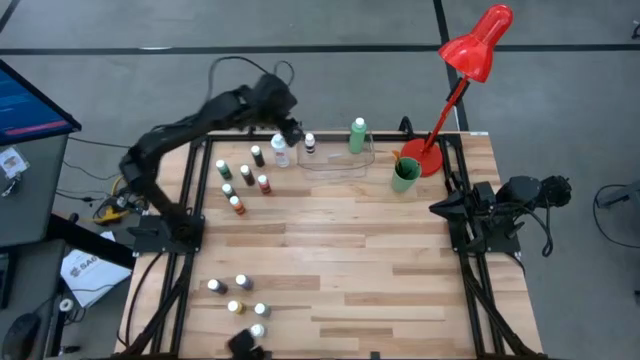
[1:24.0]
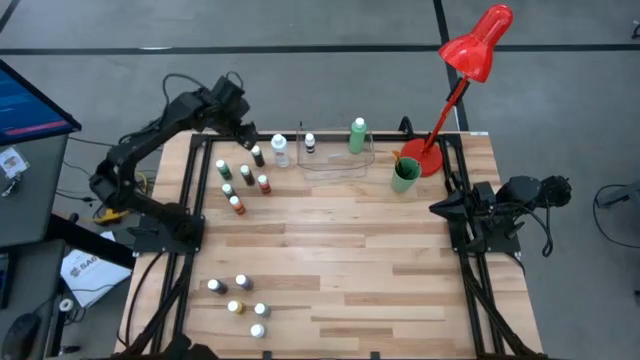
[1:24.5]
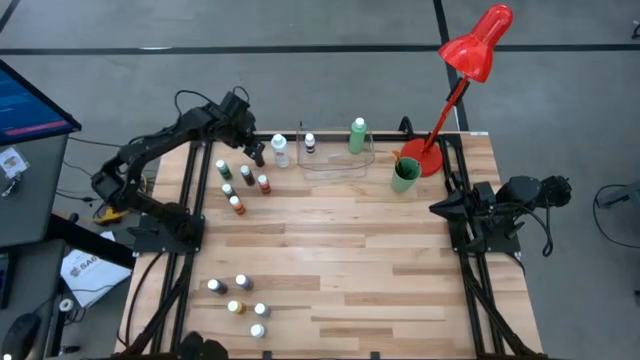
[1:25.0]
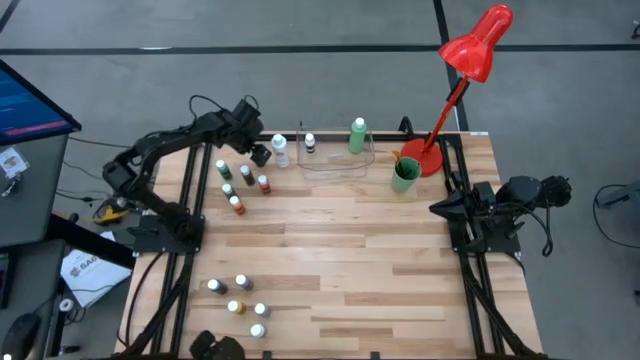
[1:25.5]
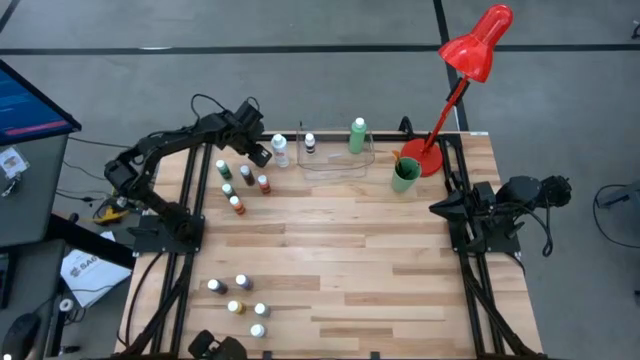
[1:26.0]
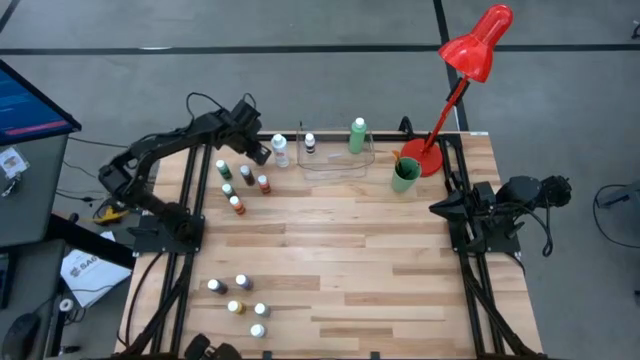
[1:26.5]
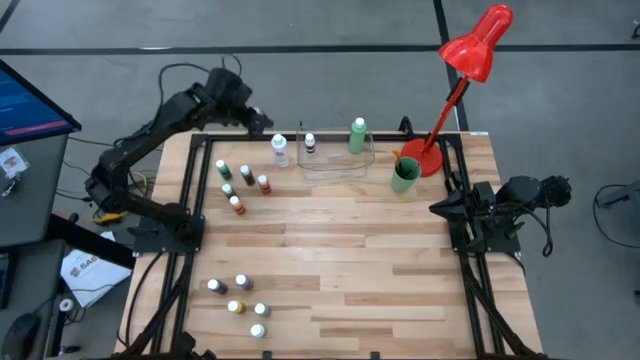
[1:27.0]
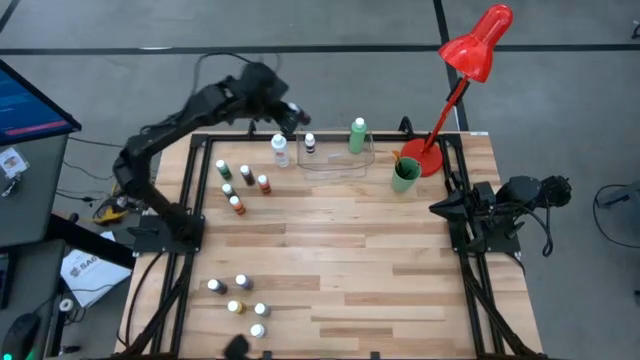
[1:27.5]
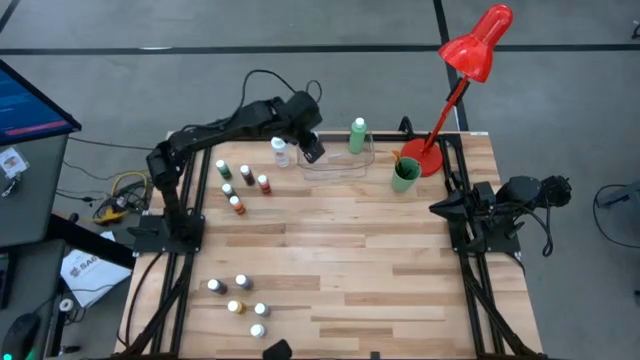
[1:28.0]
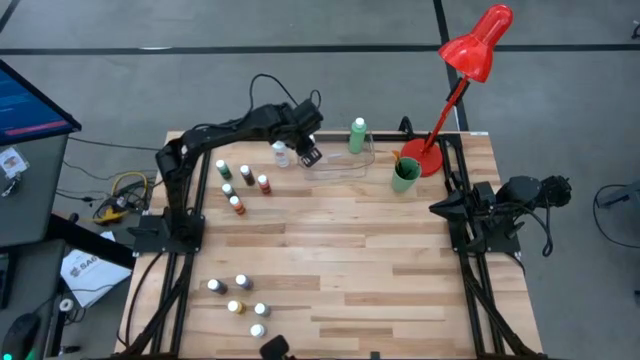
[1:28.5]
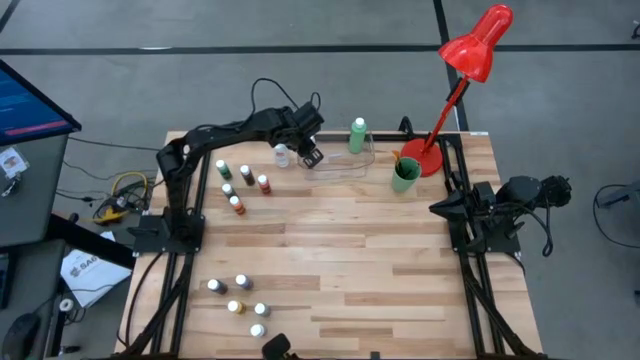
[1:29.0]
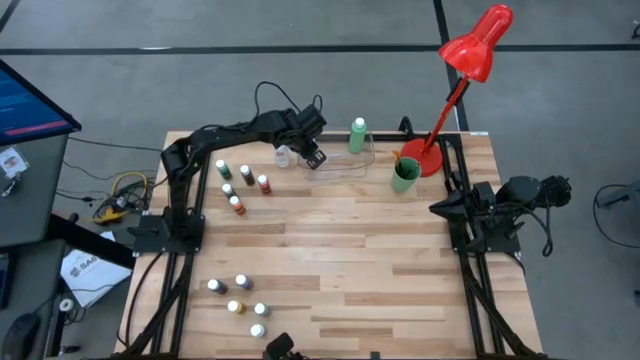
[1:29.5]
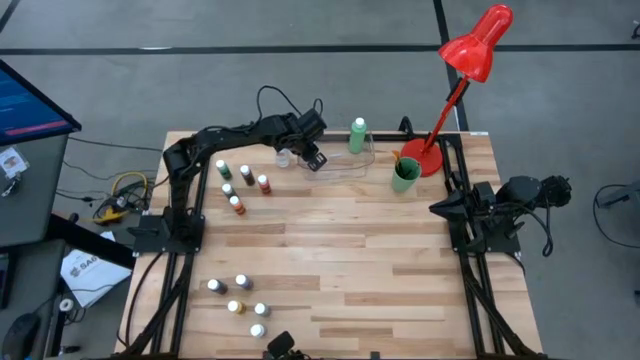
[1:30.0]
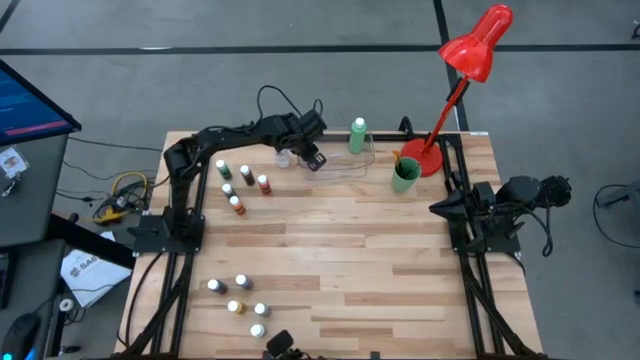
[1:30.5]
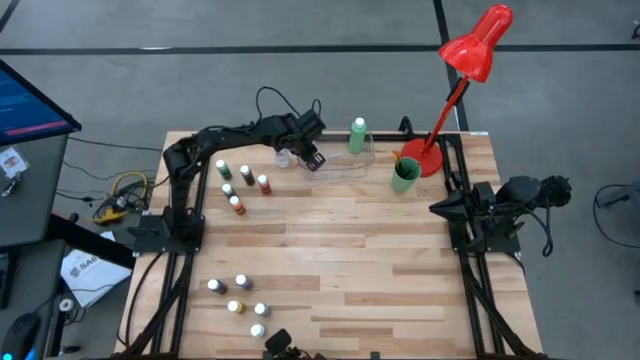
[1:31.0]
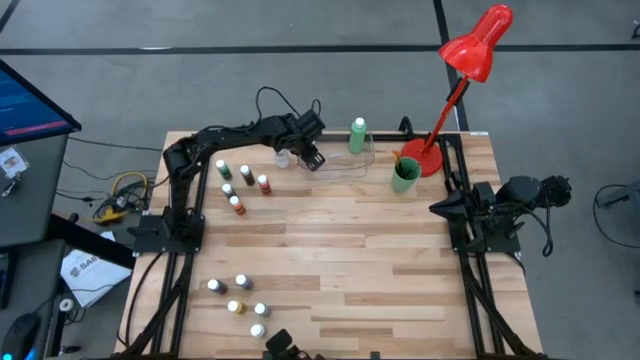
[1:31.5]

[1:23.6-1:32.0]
Task: Pick & Place Paint Supplies
Put the small black paint bottle into the transparent bin

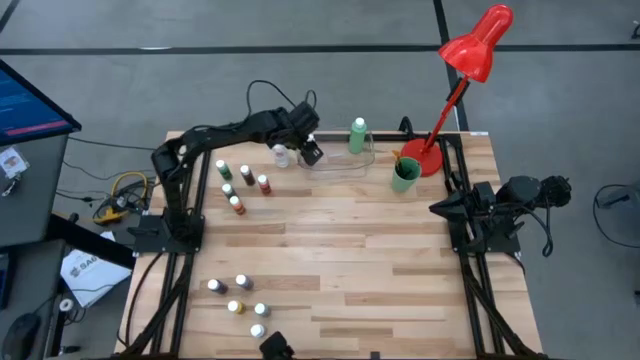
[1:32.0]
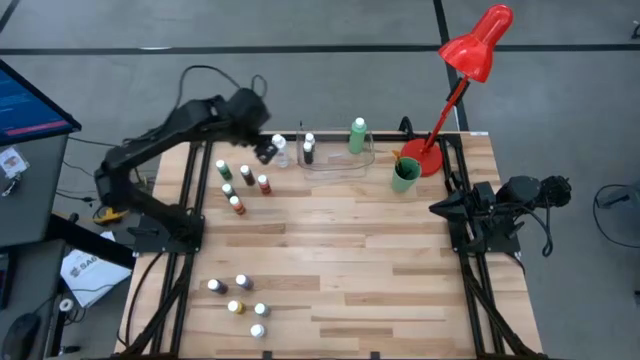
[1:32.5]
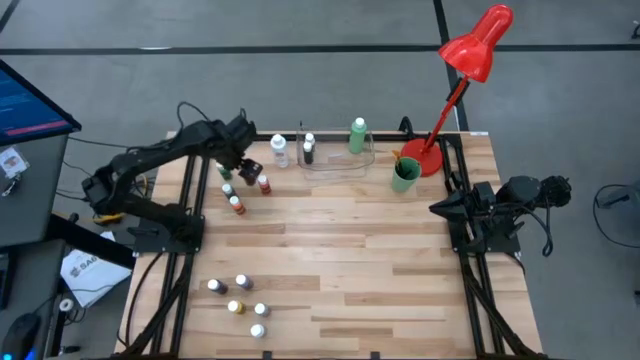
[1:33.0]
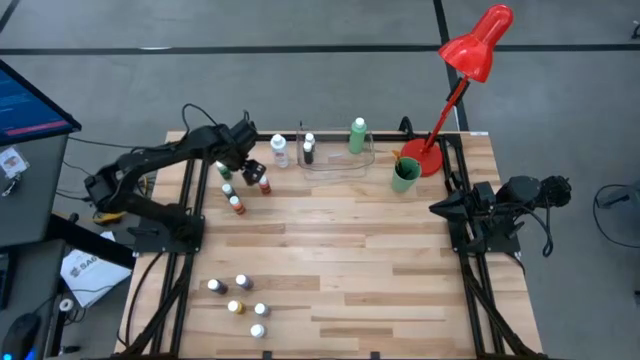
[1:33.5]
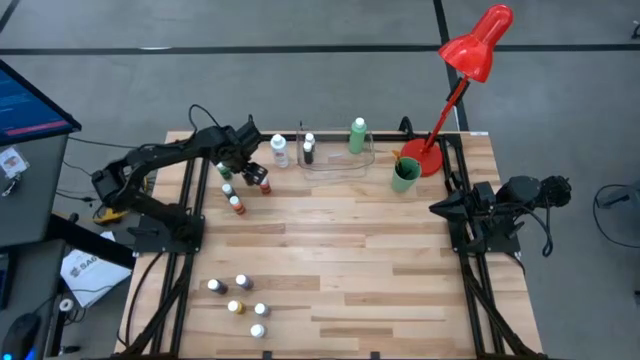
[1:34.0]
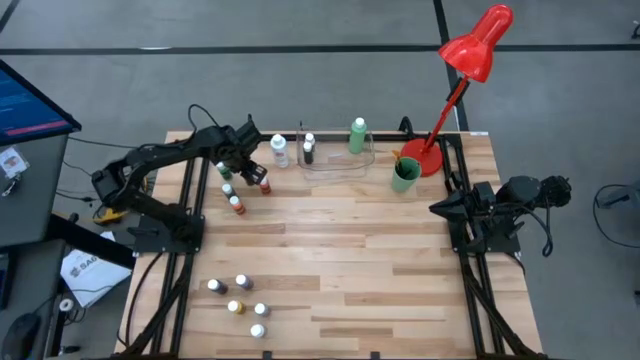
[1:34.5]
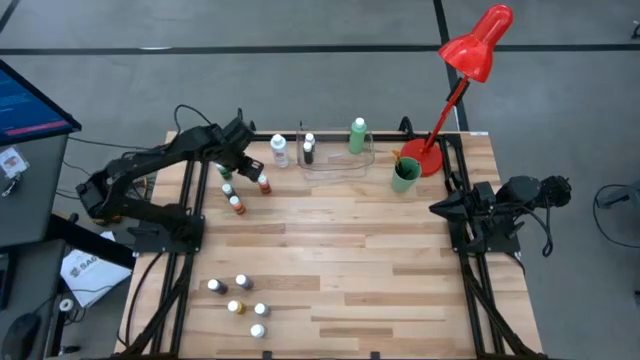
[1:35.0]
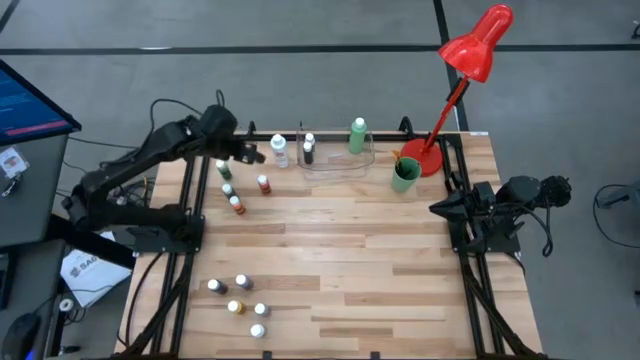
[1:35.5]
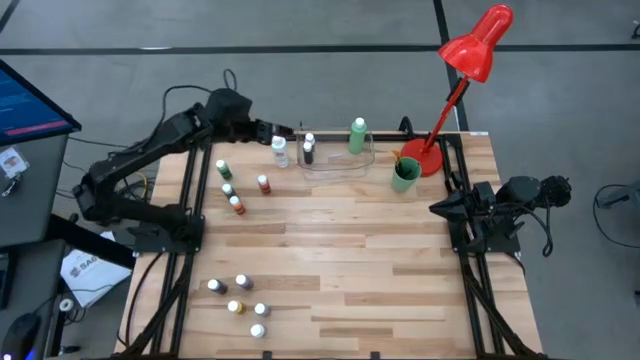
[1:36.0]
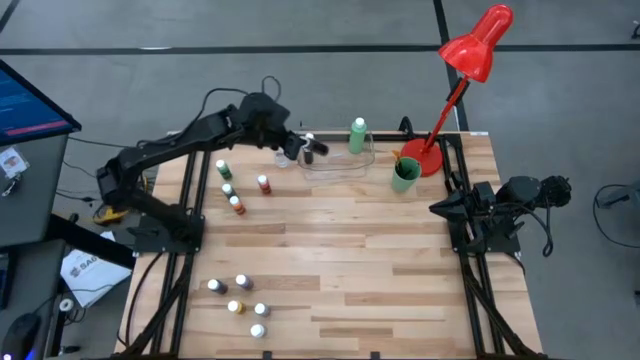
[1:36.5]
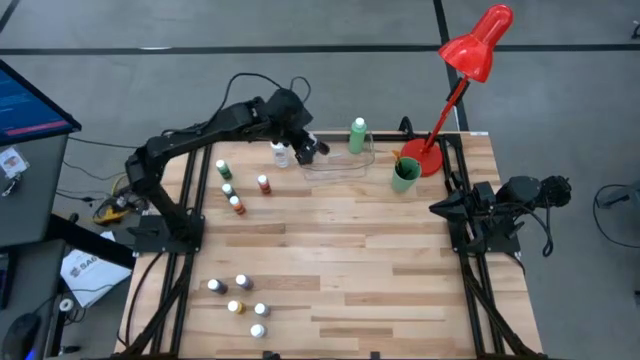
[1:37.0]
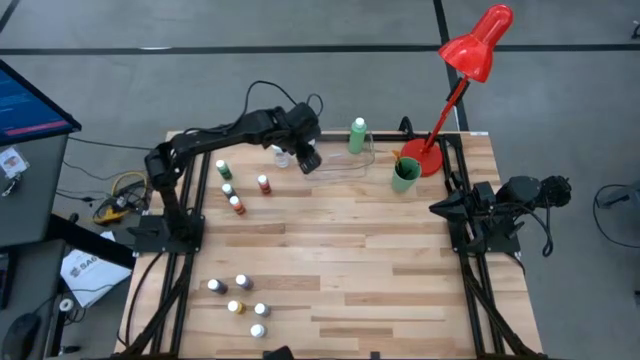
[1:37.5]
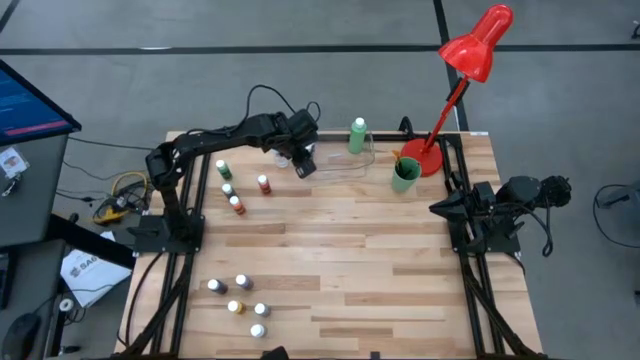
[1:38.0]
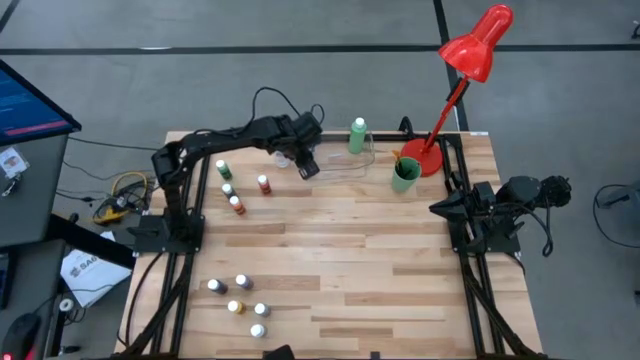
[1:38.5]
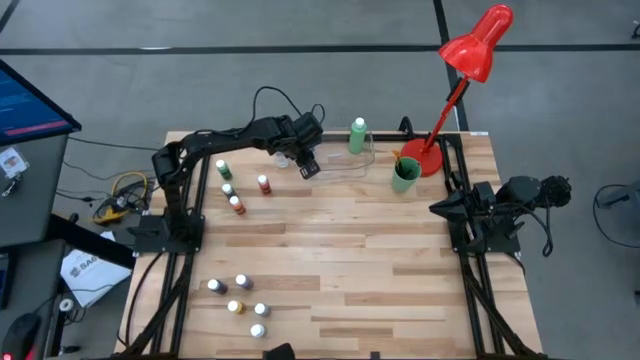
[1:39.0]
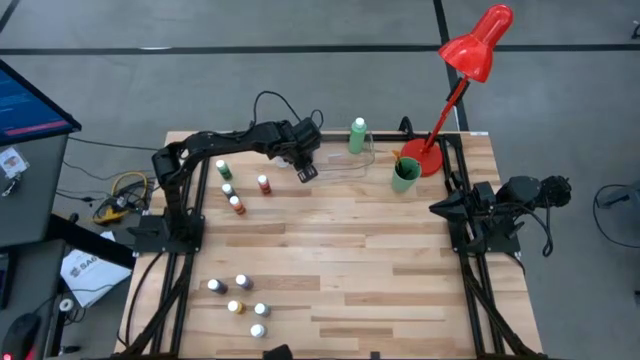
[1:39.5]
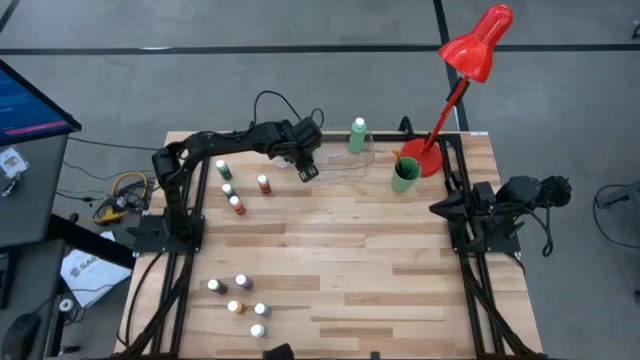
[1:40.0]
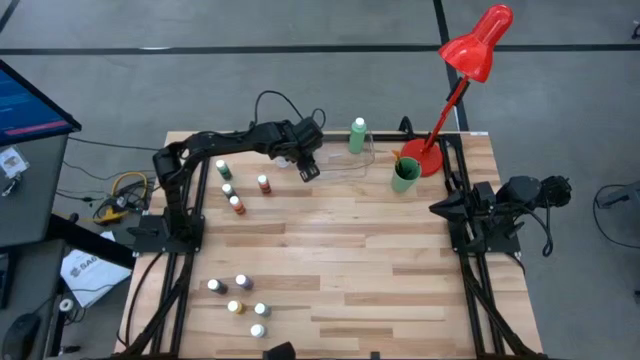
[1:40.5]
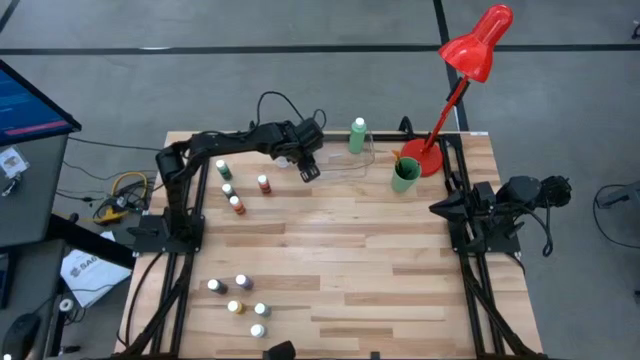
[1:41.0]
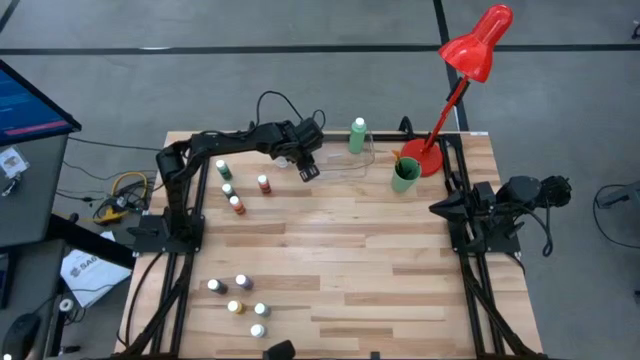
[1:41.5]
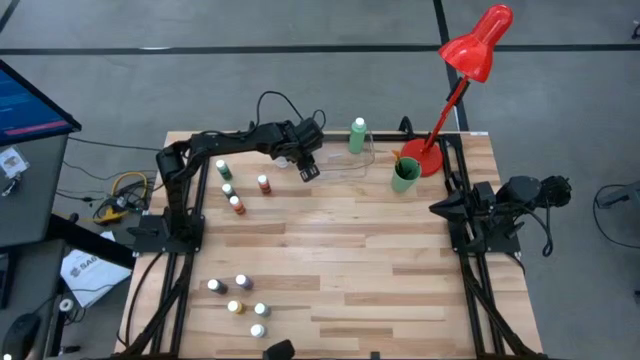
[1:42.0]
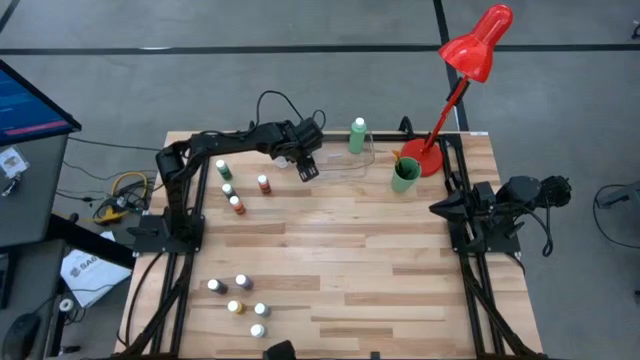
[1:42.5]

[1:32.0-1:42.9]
Put the small brown paint bottle into the transparent bin

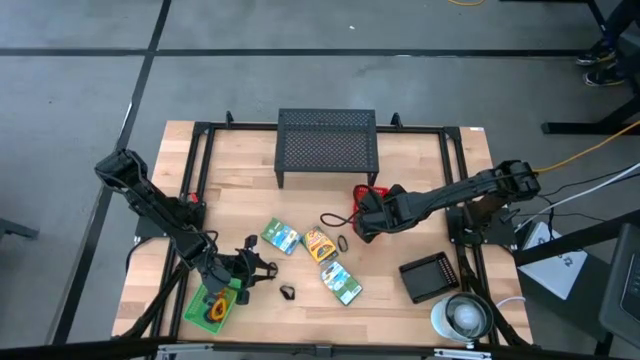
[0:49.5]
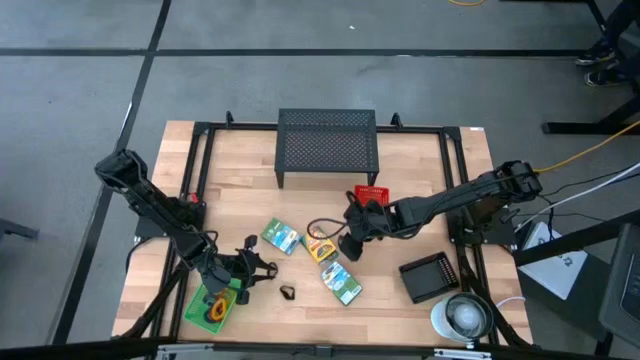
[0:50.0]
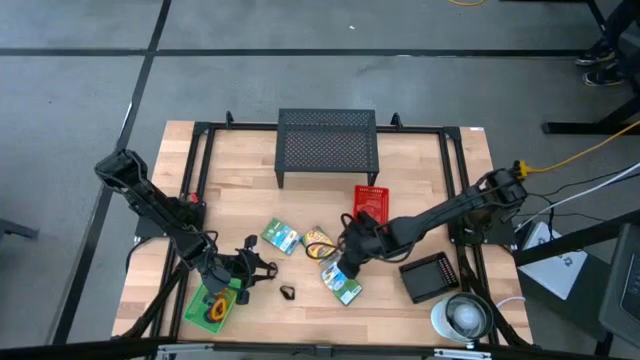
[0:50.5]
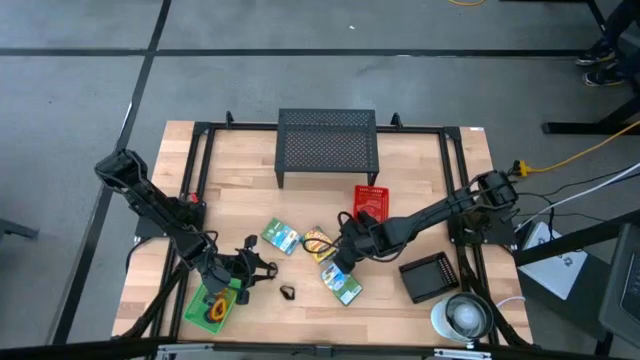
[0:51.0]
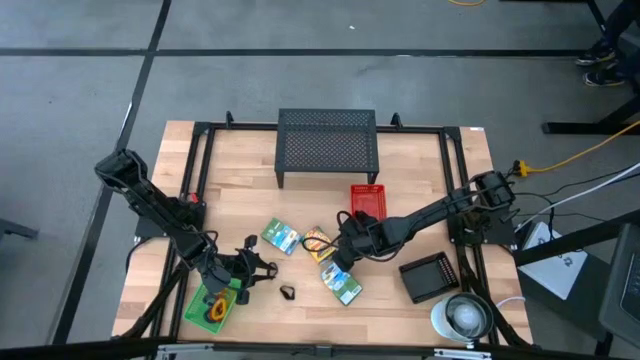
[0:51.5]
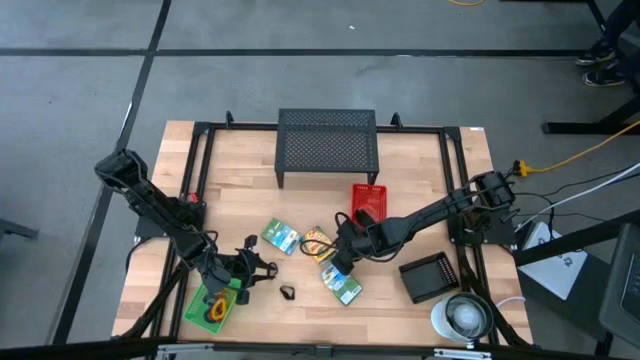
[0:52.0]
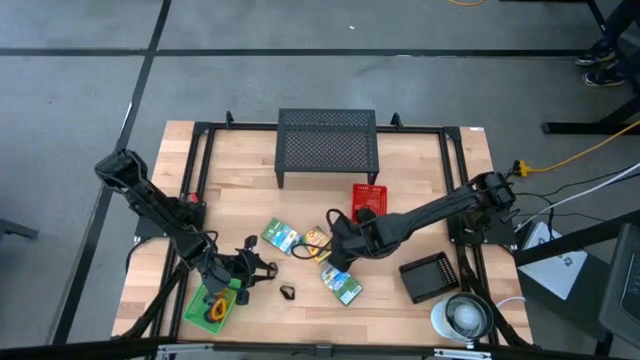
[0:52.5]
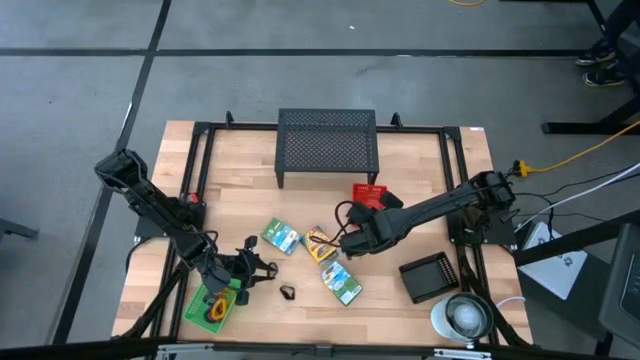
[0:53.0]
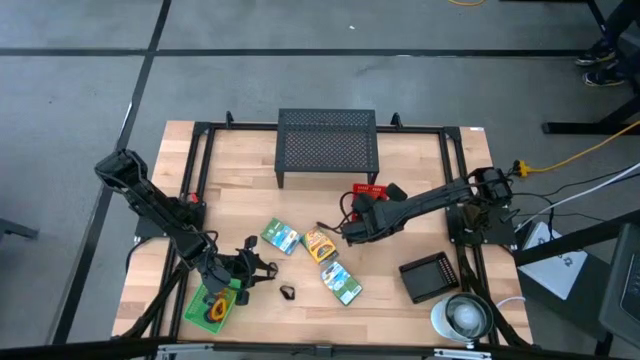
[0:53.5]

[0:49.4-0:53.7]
Task: Pick & Place Office Desk Supplies
Put the black rubberband into the red bin
